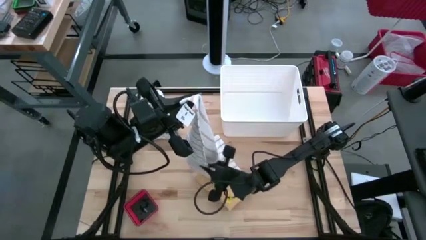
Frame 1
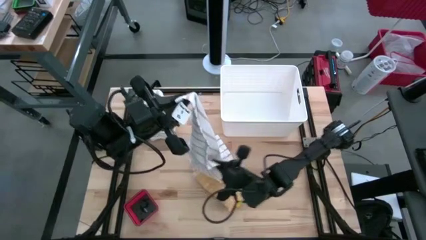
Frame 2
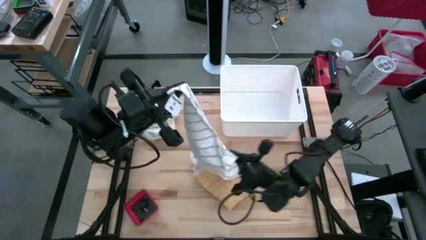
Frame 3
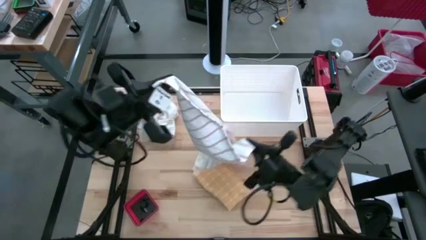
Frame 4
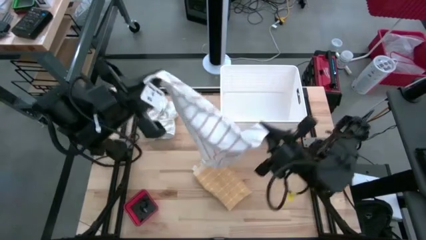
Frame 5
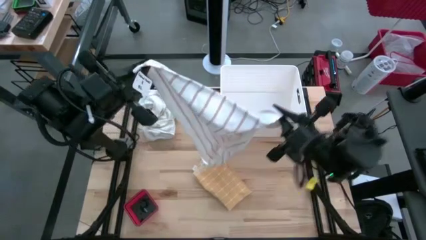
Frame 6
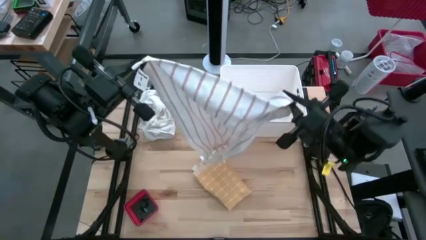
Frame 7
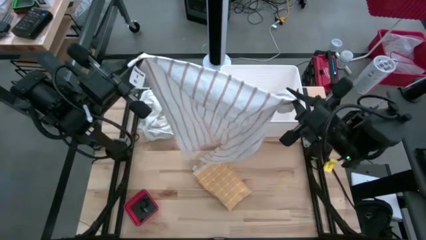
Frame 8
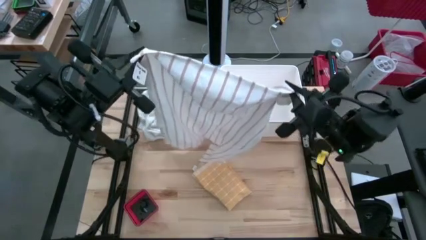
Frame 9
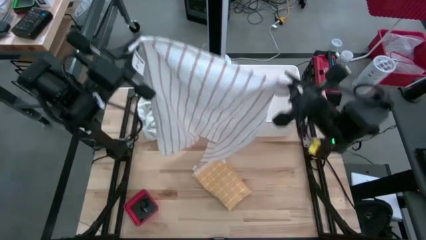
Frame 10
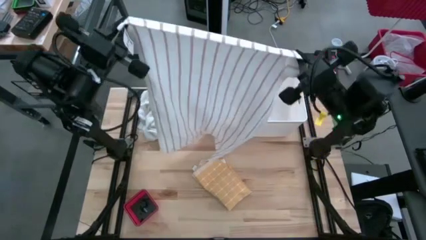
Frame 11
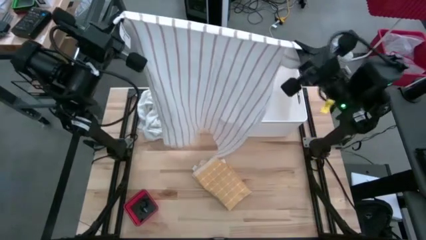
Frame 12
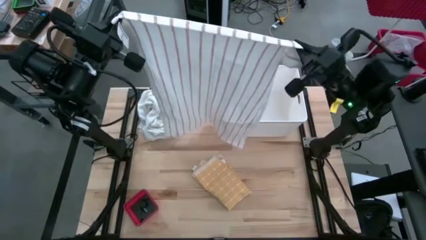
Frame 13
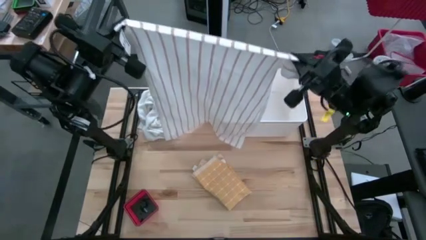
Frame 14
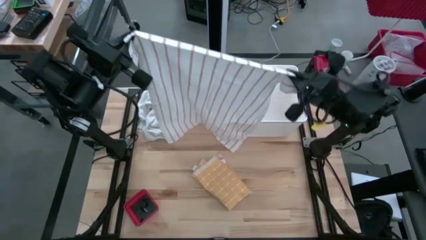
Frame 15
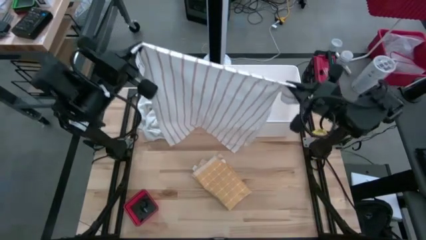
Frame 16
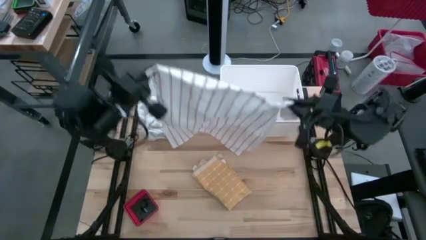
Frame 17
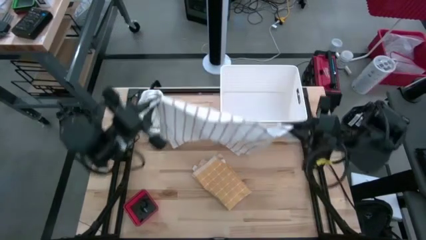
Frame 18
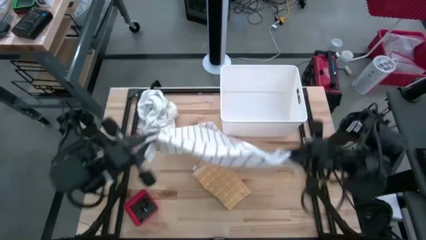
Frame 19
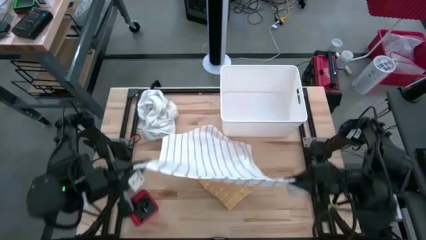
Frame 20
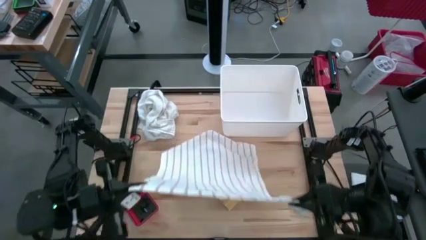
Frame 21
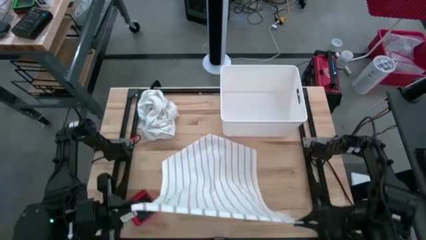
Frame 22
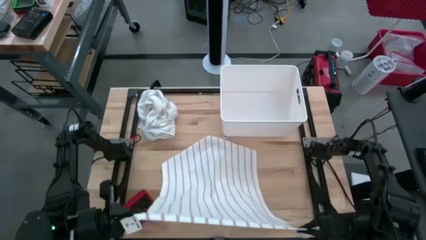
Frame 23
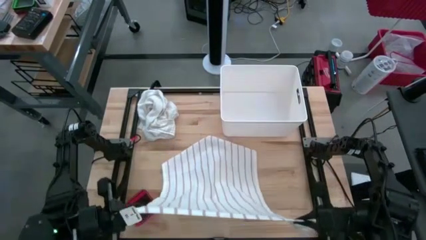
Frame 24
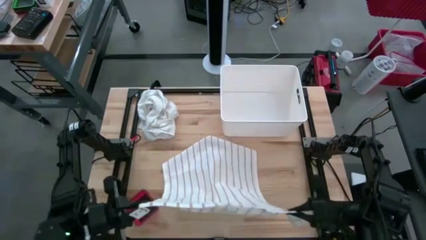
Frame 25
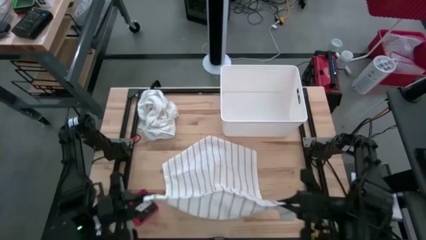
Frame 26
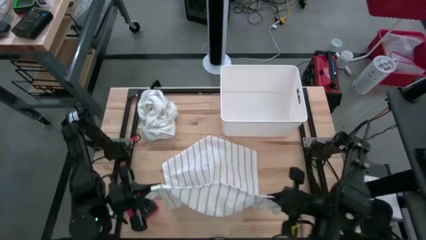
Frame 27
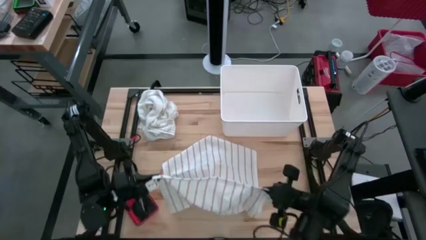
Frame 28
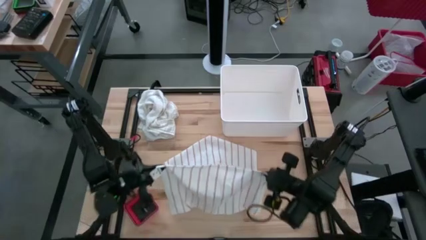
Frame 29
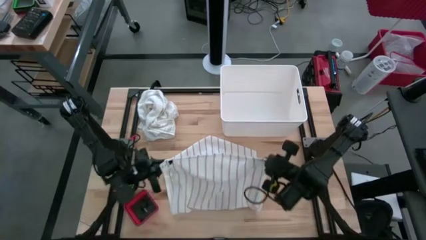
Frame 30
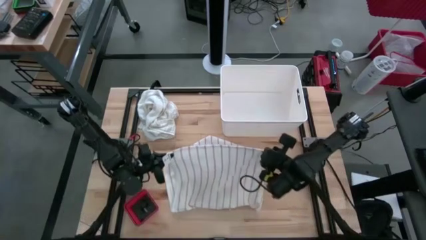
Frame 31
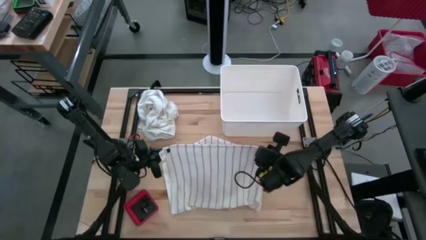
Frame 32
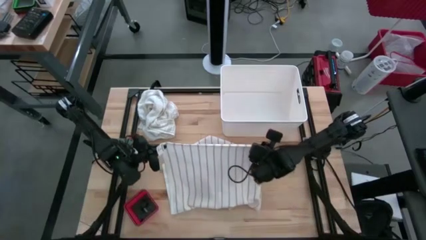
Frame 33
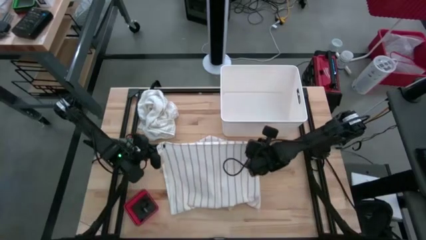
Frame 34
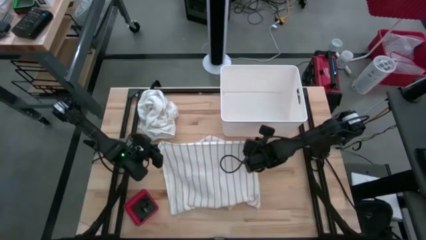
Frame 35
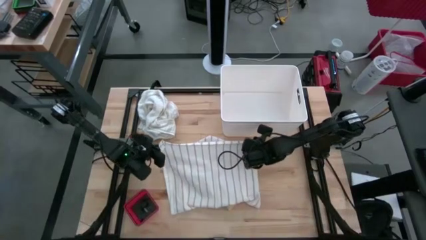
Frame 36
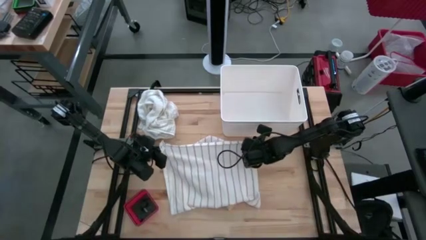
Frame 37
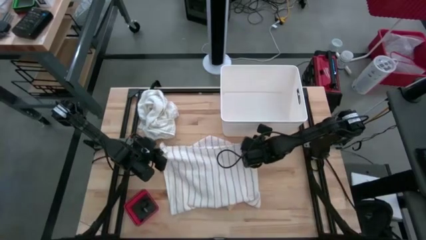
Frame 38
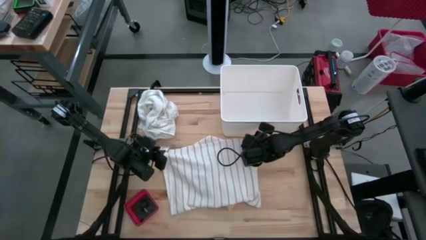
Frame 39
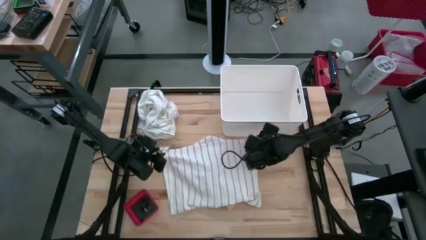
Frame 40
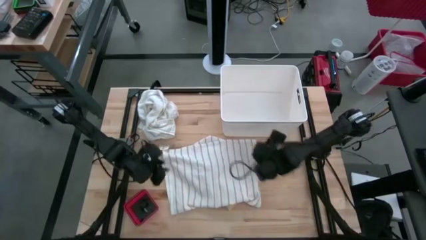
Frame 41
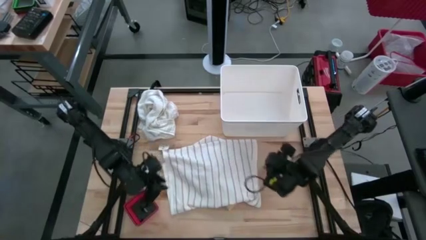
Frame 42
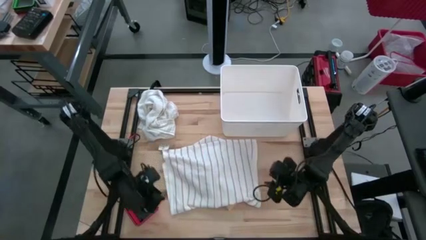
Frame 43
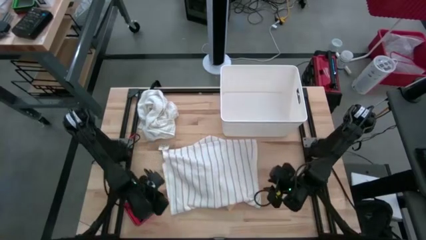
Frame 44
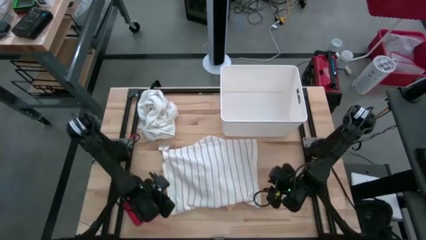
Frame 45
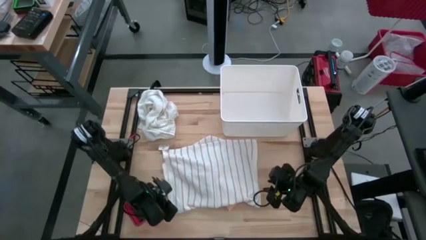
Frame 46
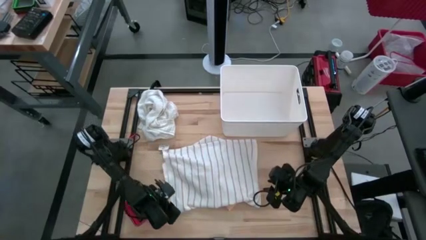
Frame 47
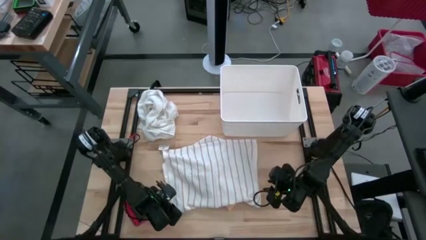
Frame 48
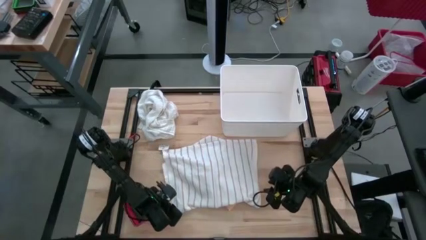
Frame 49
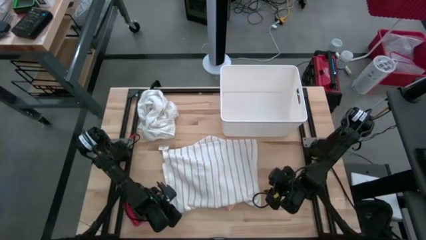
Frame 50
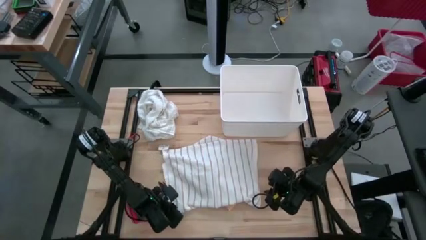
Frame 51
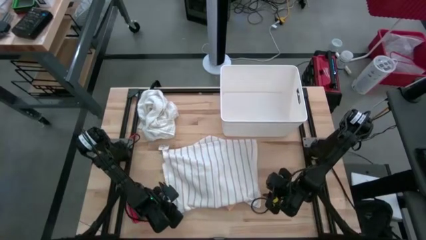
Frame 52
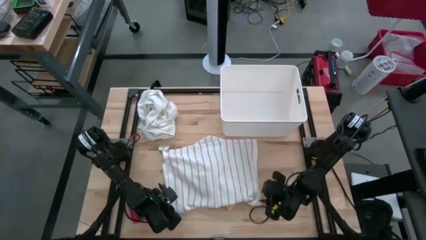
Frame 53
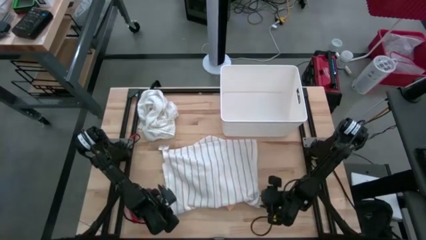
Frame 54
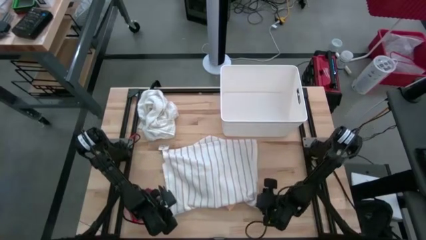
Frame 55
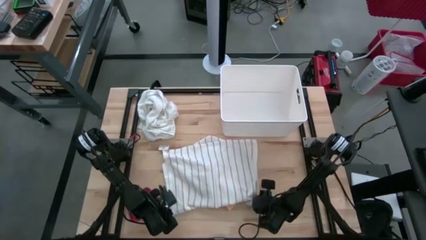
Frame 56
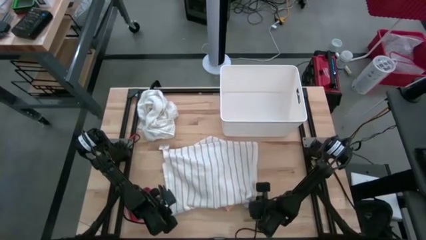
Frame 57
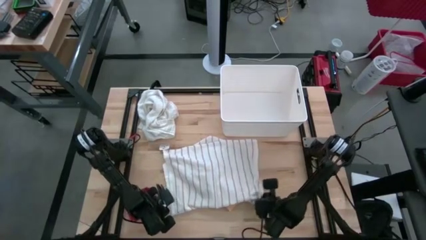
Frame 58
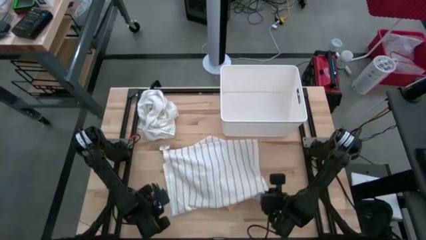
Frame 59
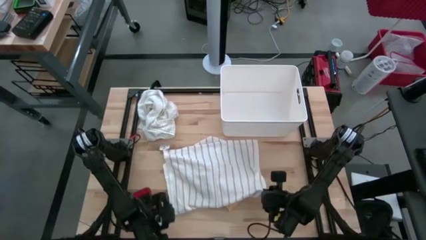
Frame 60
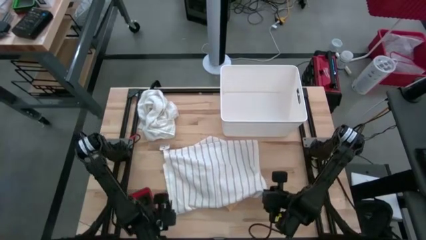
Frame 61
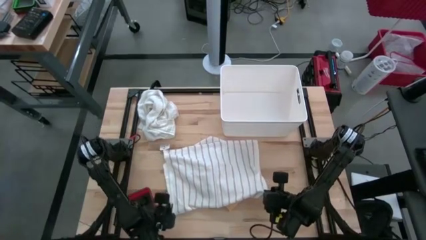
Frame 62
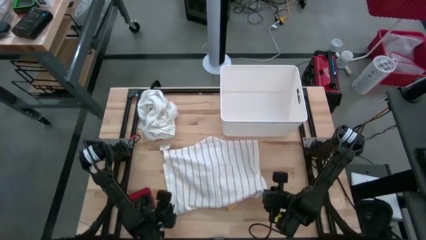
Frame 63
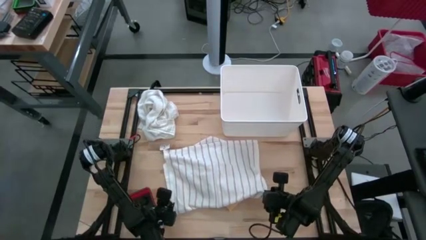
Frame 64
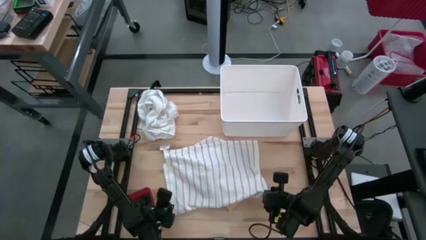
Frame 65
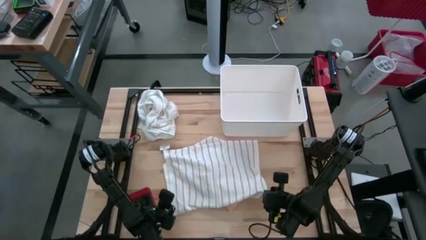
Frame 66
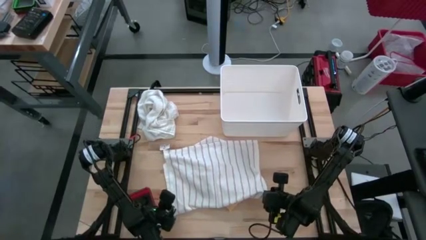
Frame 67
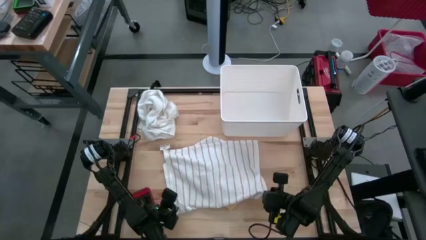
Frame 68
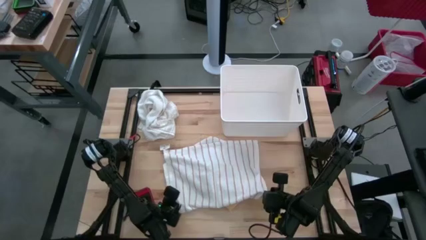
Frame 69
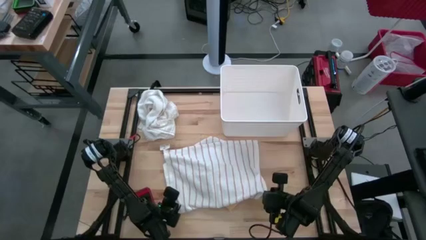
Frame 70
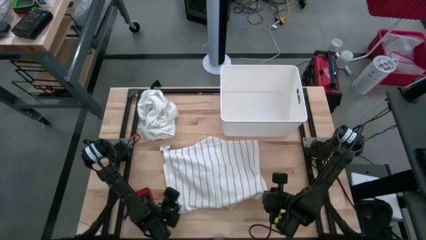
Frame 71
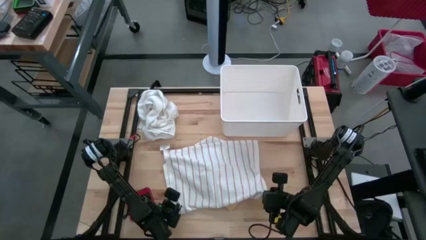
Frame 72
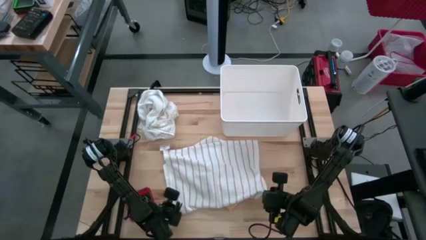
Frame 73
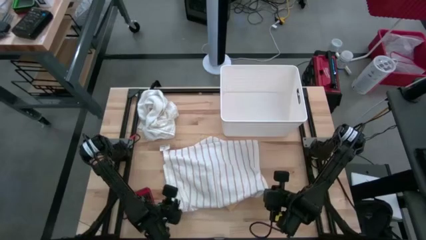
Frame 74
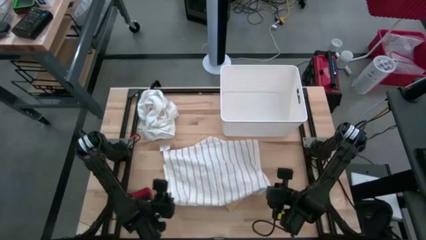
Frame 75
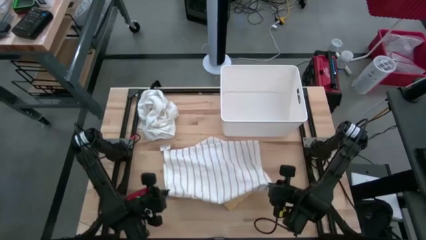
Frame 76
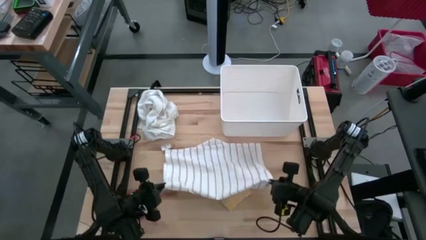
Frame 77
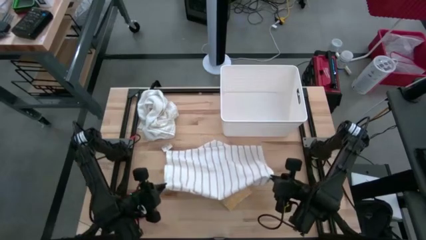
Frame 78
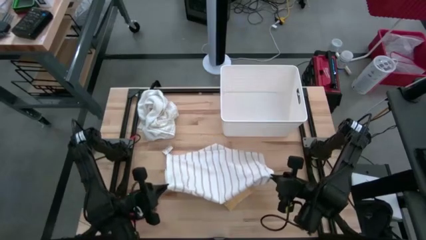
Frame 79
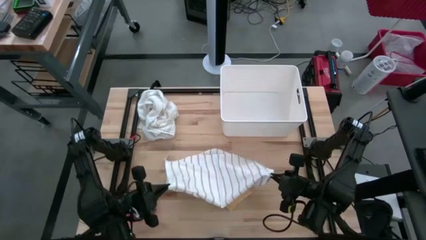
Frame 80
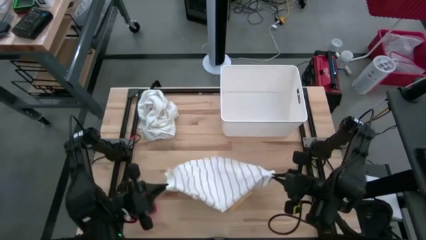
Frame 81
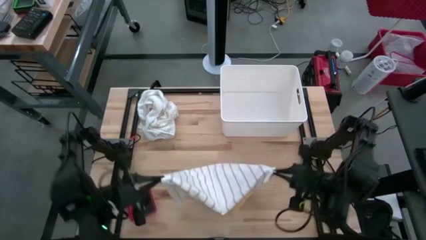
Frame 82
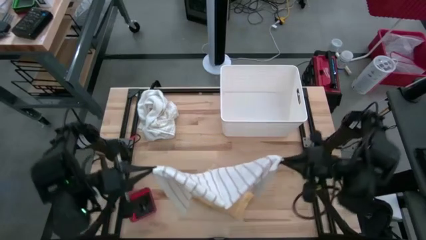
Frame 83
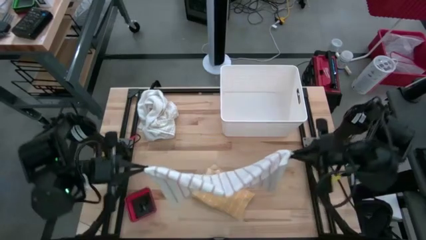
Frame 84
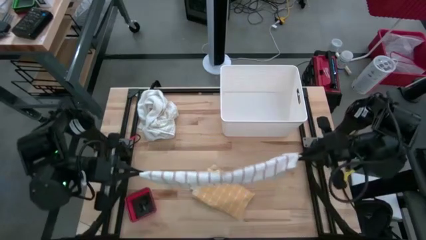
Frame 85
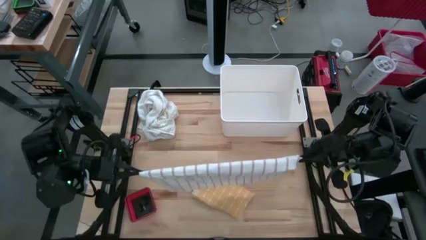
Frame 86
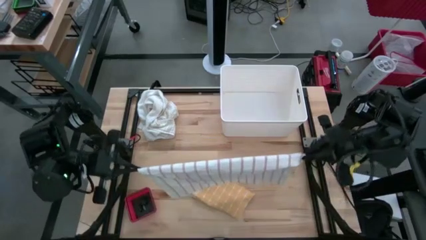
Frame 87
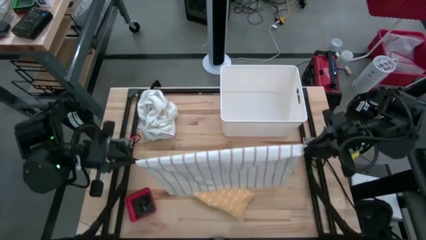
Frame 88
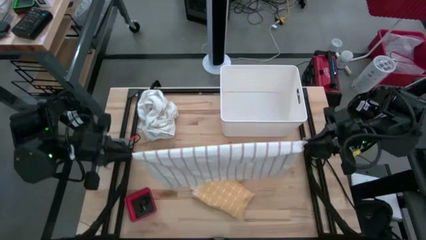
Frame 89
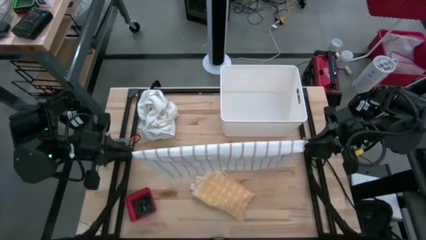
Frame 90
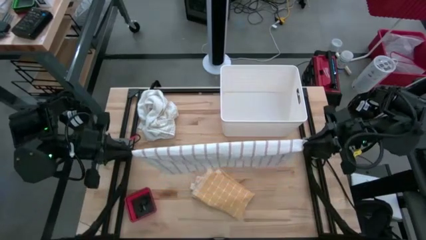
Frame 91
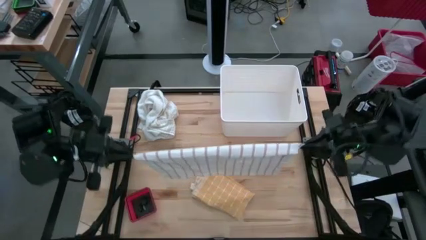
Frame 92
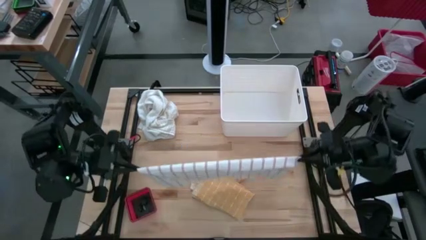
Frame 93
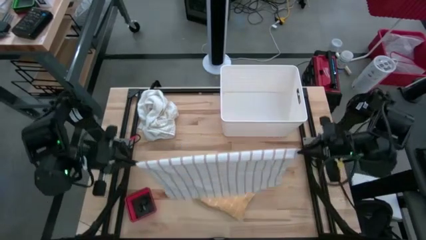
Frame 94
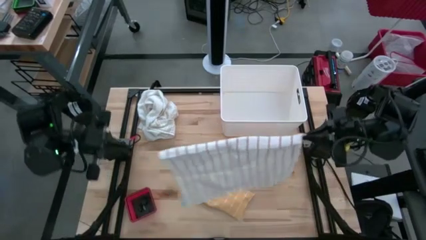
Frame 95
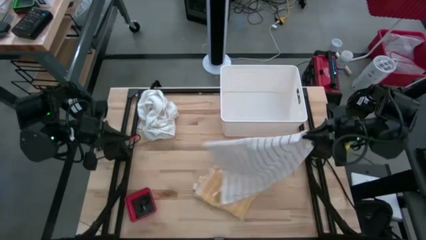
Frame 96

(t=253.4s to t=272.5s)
Task: Fold towel
Fold the white kitchen towel
